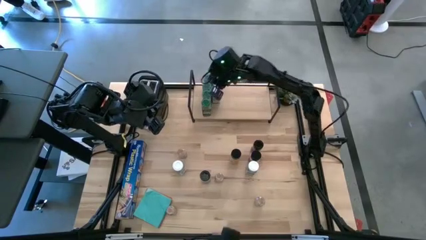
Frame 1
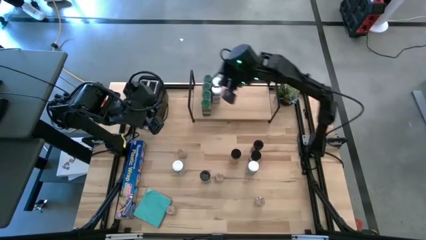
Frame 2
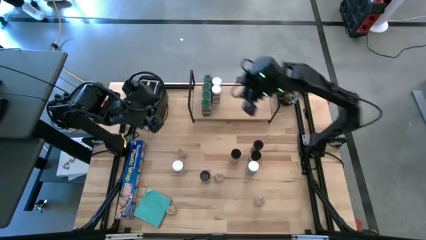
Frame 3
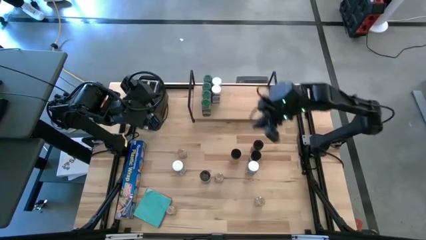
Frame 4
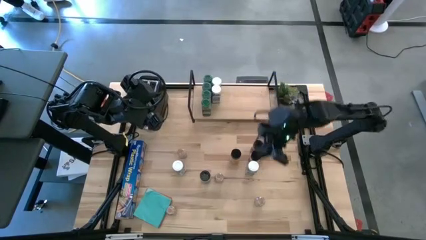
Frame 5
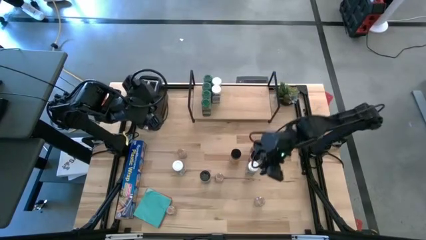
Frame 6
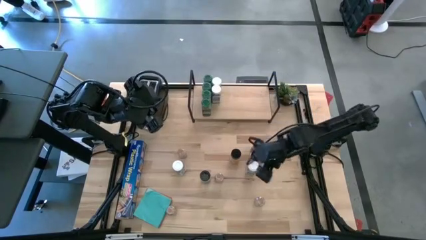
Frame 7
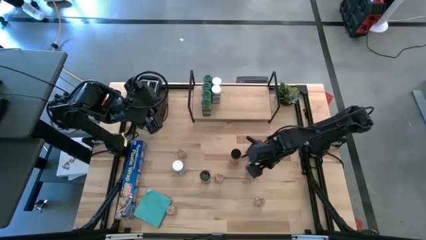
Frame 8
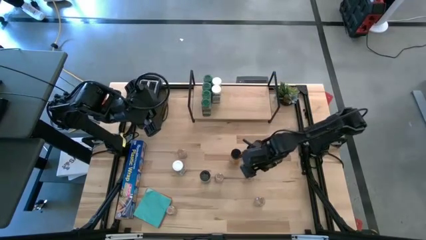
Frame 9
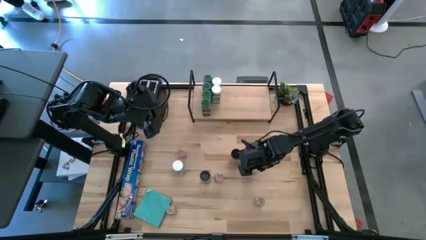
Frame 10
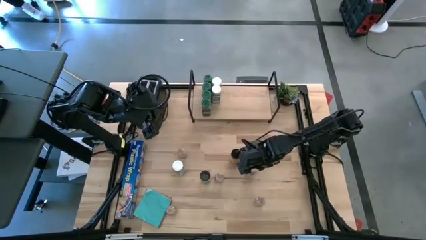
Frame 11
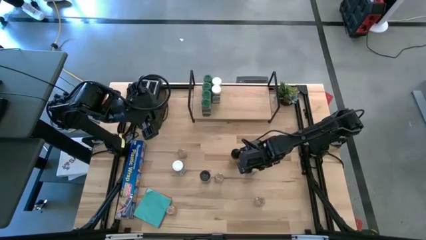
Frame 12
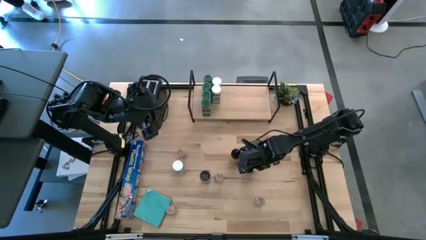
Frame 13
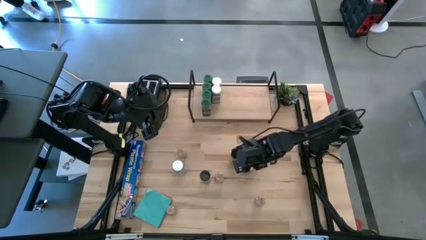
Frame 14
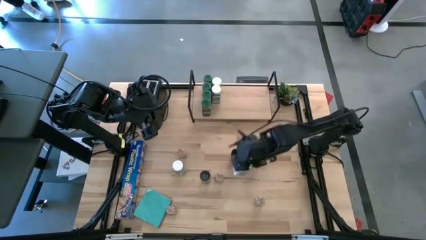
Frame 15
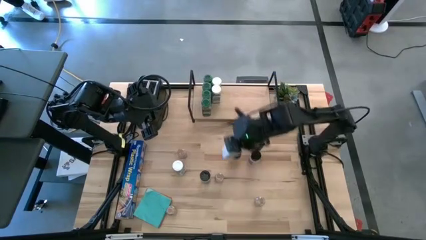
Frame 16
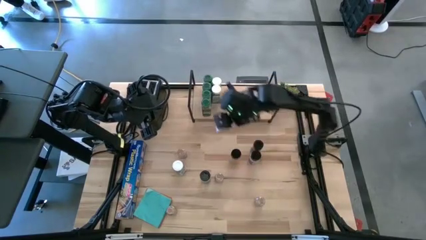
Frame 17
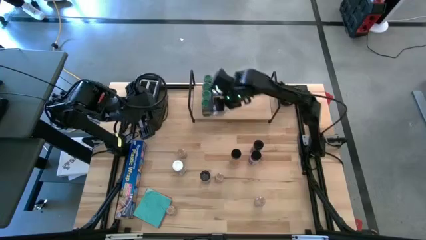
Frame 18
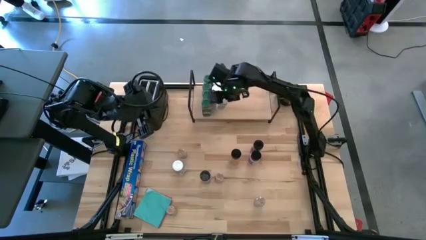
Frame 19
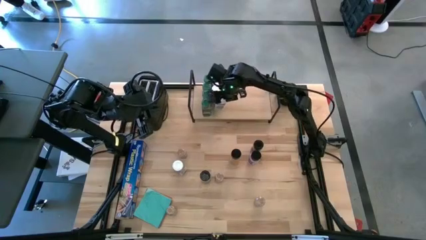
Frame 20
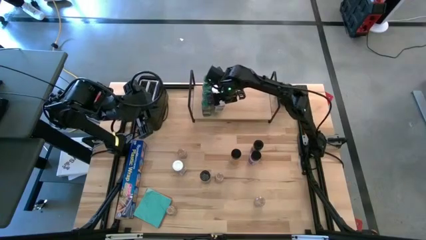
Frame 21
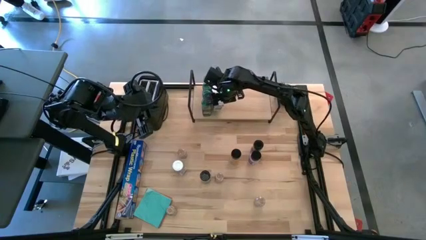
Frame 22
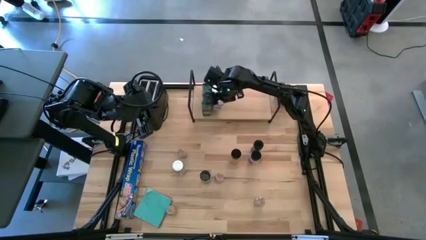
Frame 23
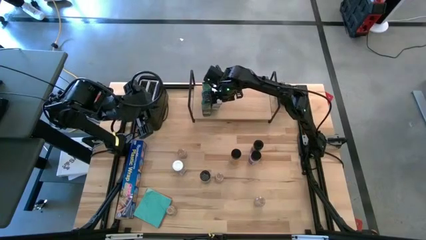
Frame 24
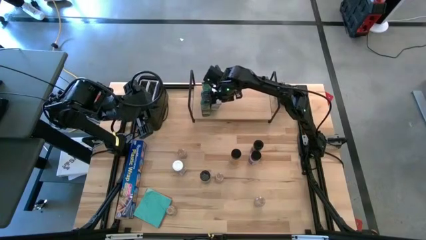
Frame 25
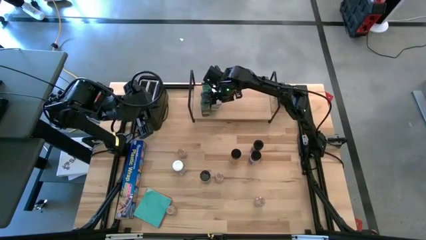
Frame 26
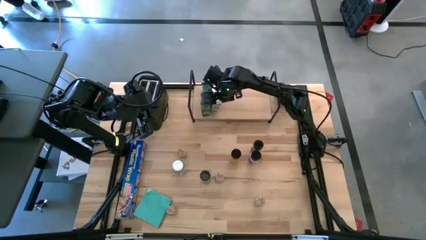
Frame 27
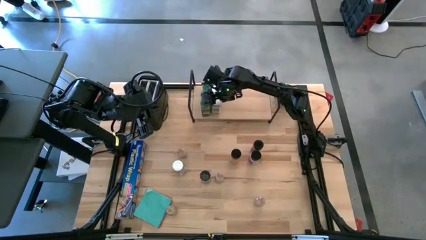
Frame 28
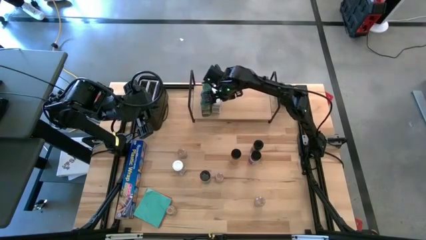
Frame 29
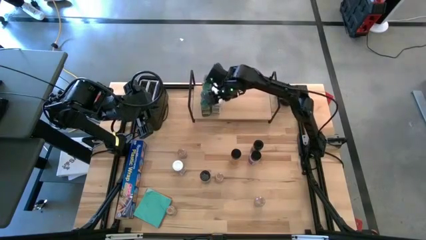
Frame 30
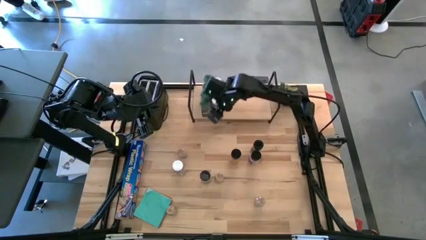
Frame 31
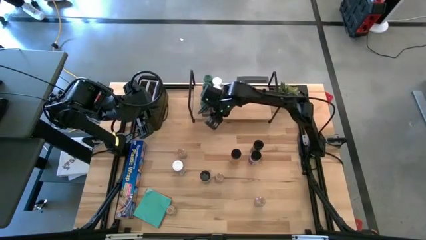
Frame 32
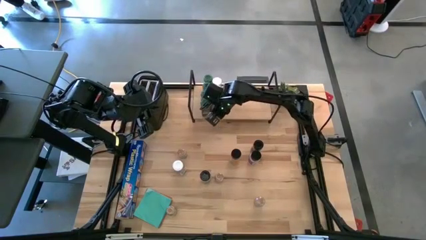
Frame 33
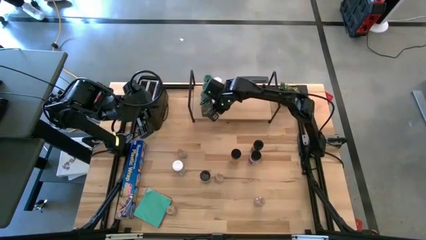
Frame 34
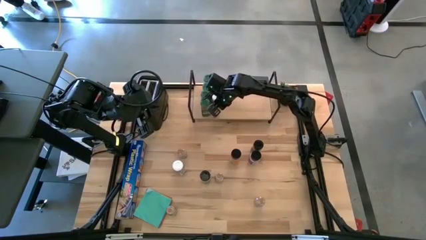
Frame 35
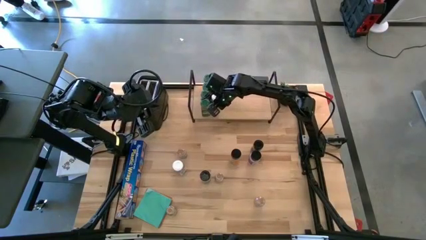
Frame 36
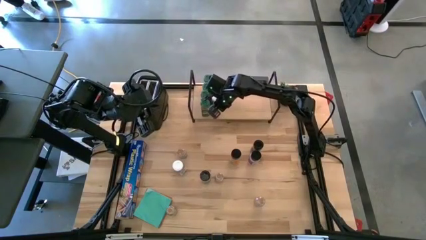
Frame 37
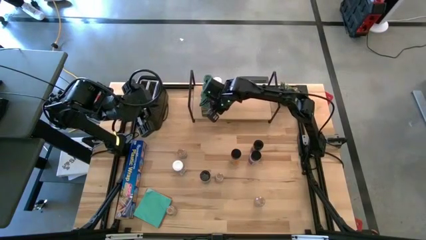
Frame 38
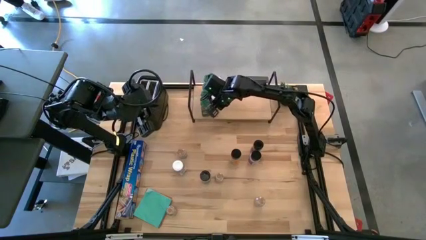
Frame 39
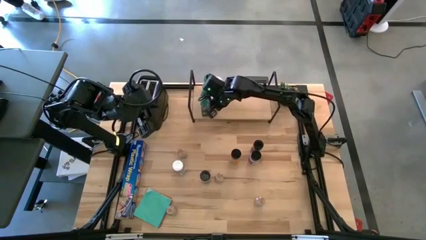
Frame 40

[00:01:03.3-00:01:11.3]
Task: Shelf spices
Put the right white seasoning bottle on the shelf aligned with the other white seasoning bottles

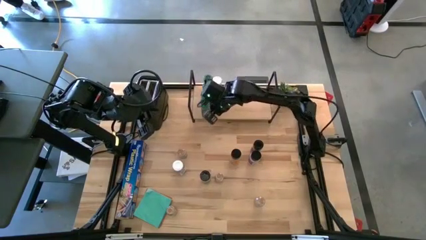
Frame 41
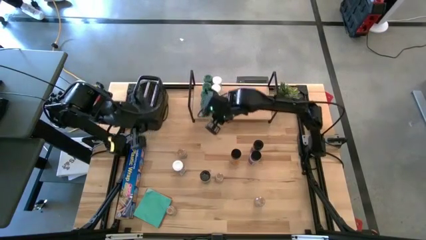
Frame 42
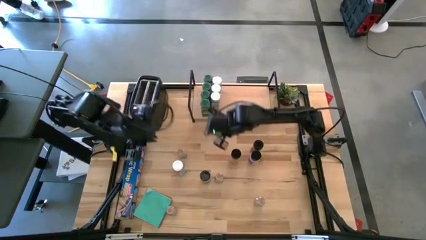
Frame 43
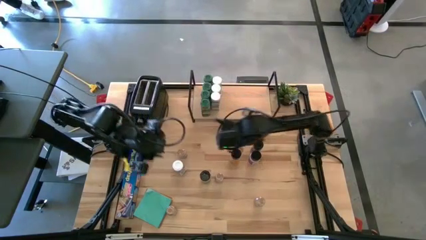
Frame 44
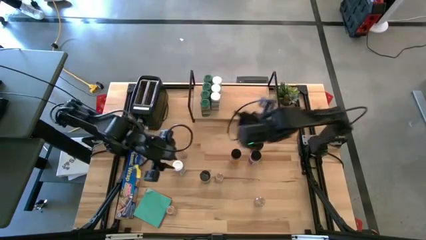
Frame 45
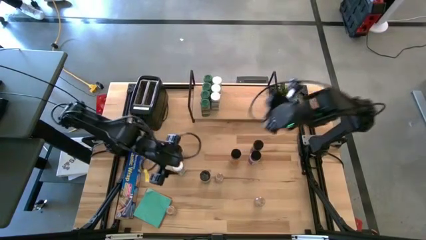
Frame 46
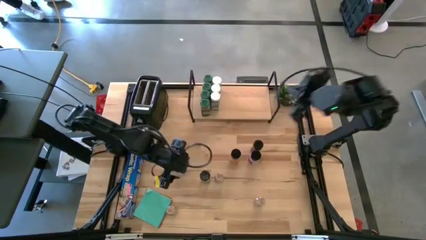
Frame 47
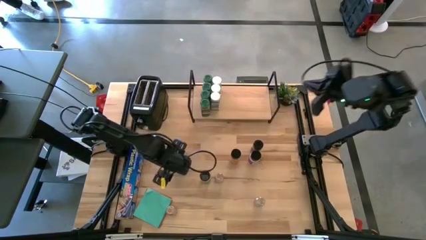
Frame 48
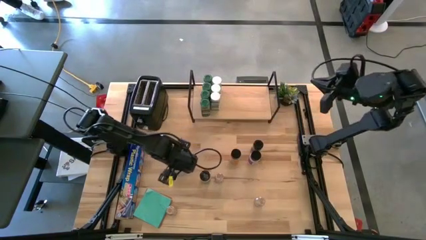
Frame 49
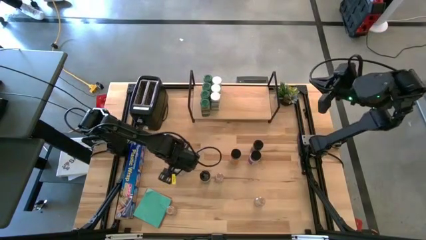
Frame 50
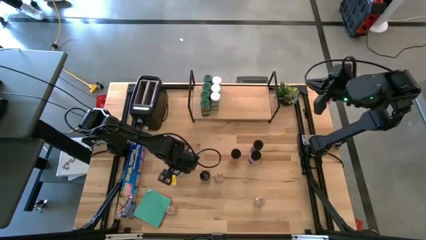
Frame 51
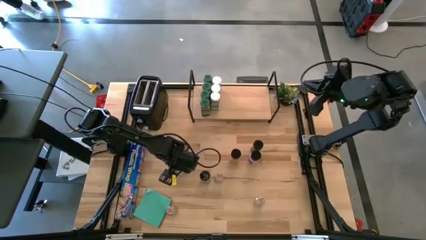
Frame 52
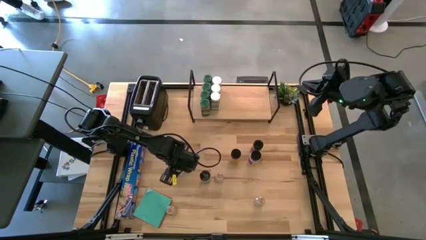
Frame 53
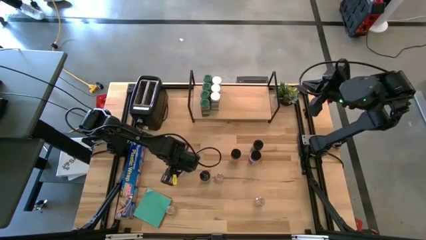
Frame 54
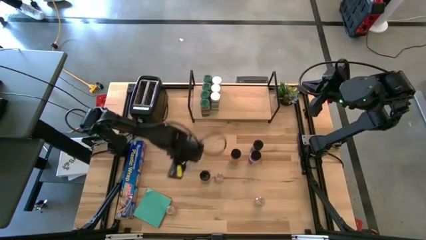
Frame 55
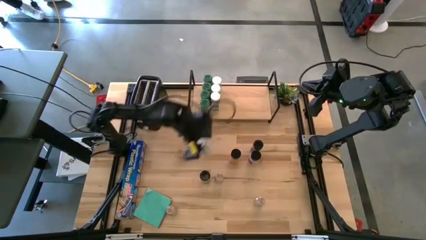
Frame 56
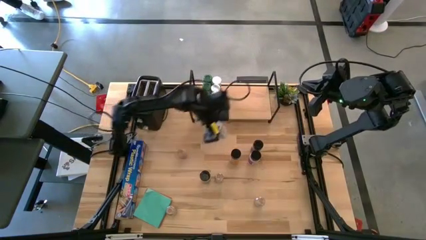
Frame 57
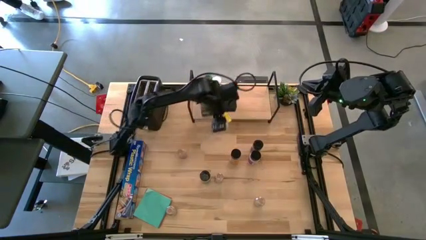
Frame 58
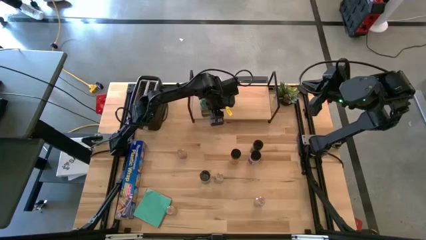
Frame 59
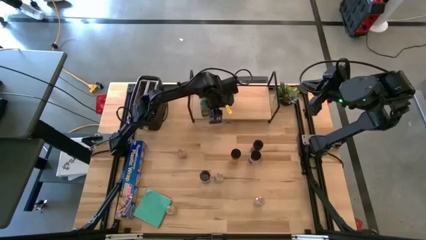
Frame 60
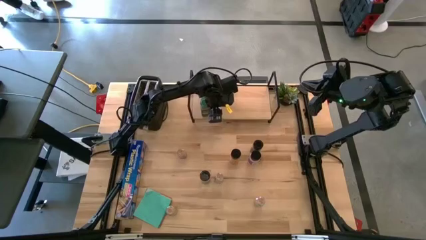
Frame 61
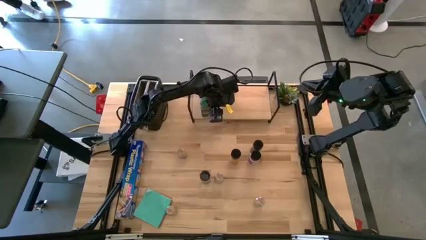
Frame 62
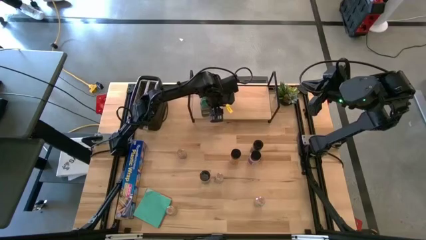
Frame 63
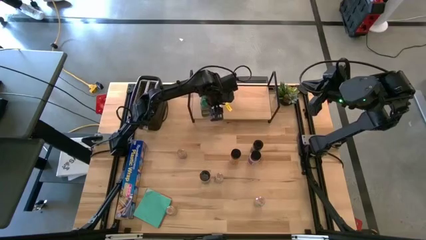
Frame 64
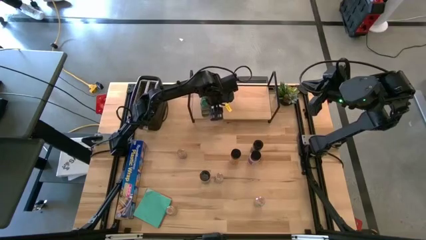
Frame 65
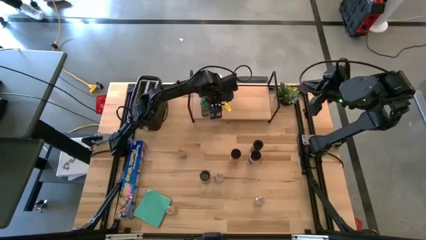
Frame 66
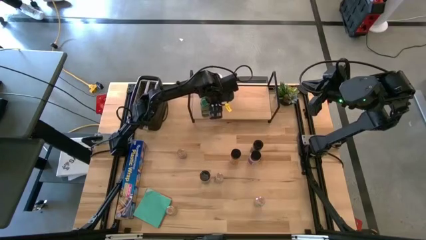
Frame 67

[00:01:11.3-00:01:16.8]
Put the white seasoning bottle on the shelf aligned with the other white seasoning bottles

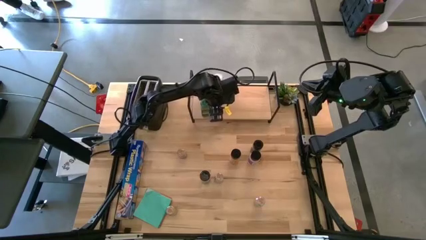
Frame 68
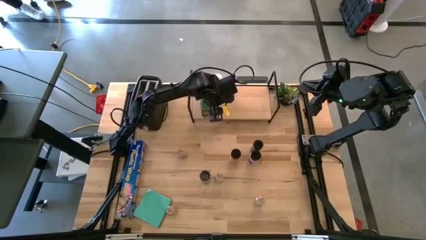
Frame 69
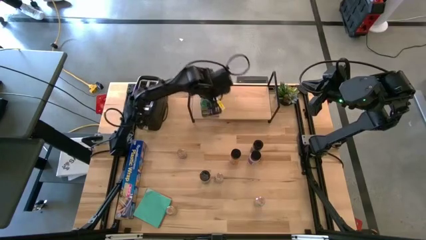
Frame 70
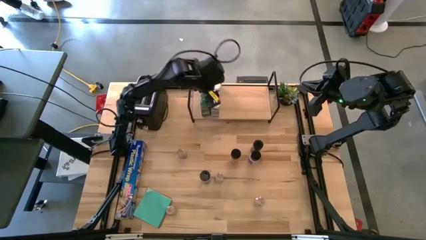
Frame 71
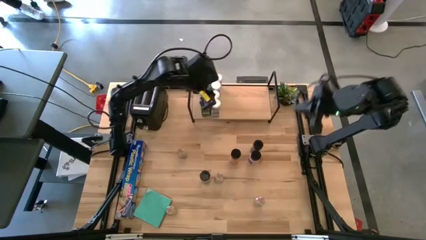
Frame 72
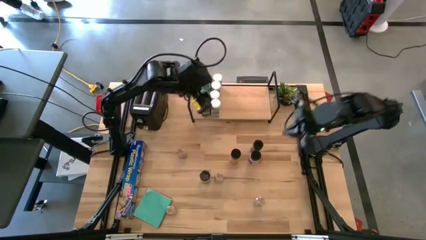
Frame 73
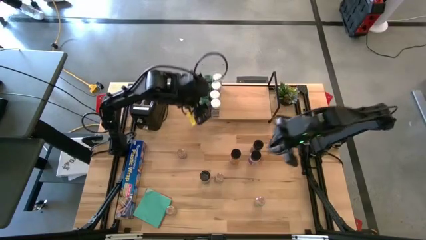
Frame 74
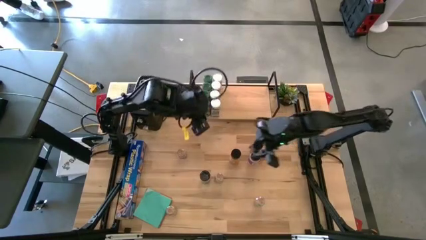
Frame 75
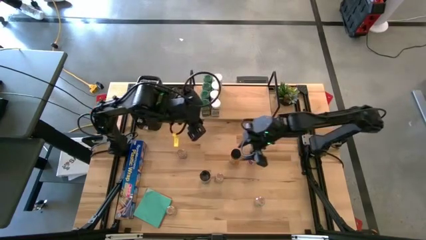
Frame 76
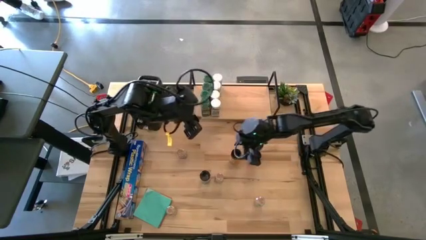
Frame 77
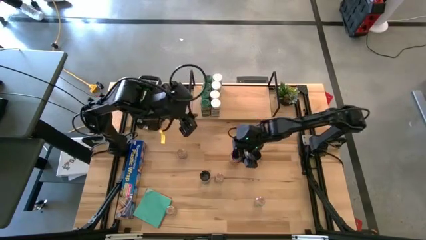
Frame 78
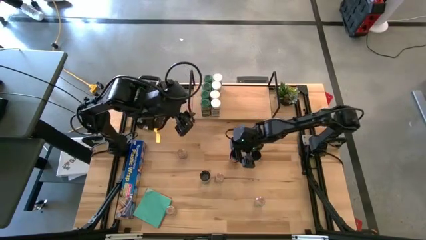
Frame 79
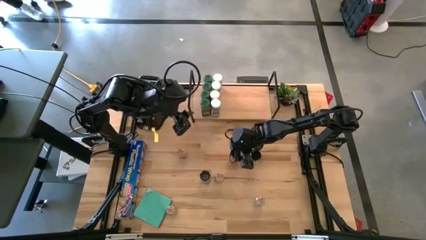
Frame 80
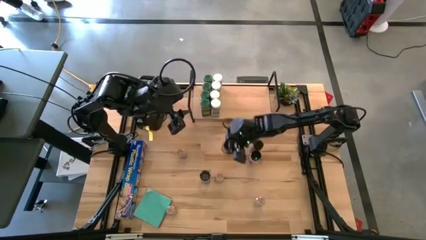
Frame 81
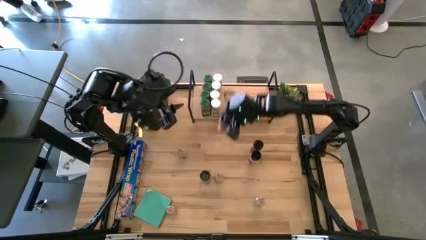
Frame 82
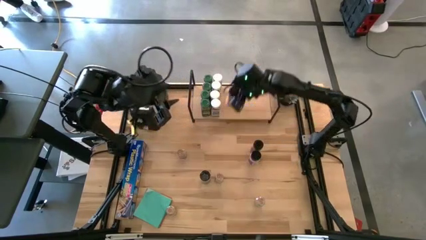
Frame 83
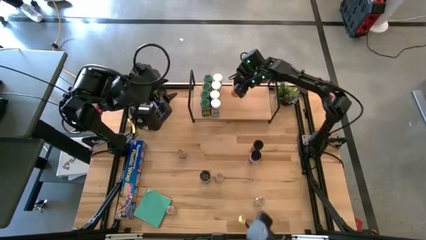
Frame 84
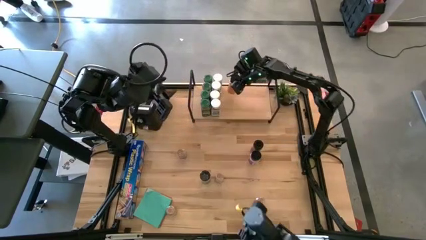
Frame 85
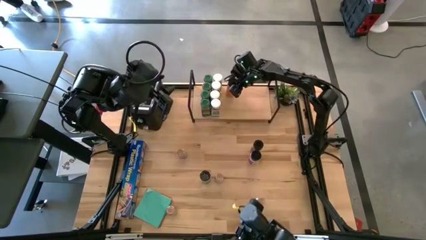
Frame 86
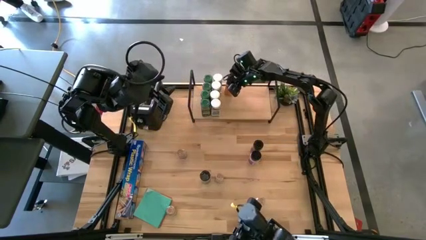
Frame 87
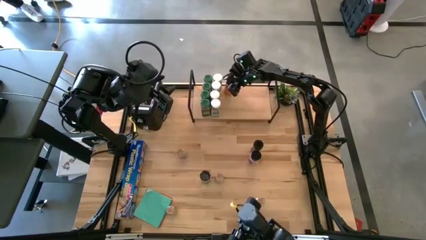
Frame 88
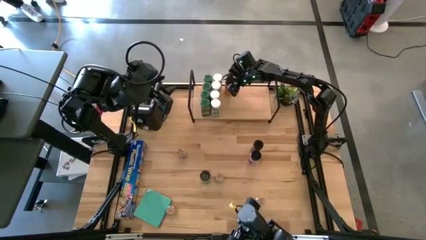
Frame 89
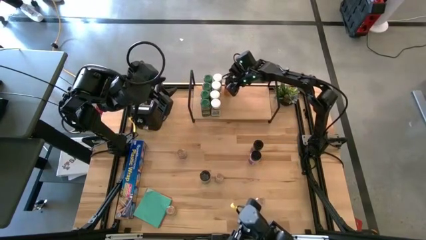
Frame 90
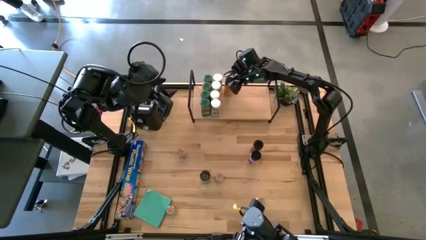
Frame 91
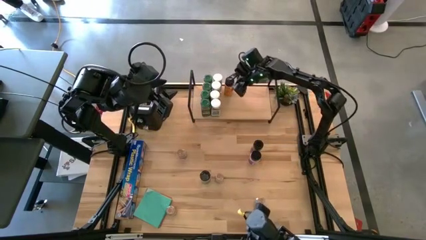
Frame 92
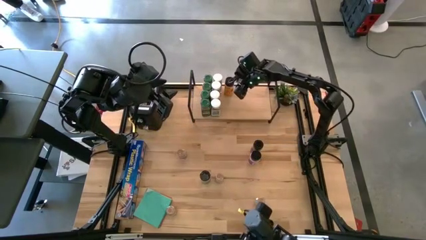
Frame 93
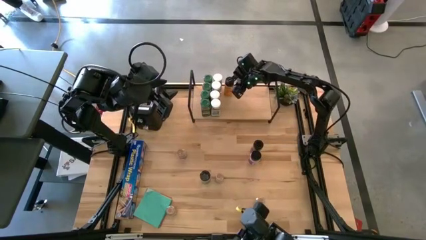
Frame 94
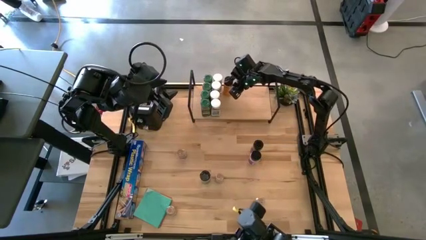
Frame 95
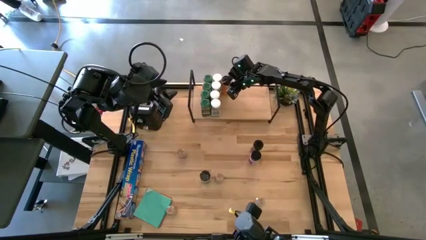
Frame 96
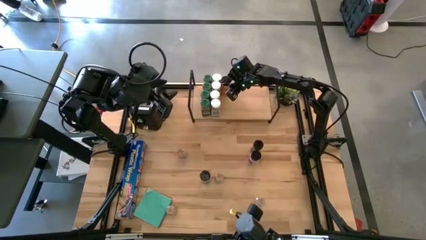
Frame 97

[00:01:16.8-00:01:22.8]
Put the middle left black seasoning bottle on the shelf
